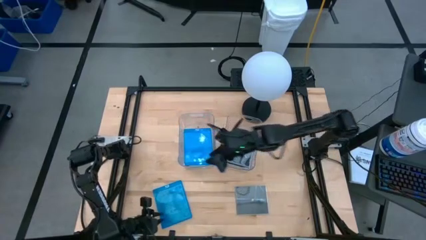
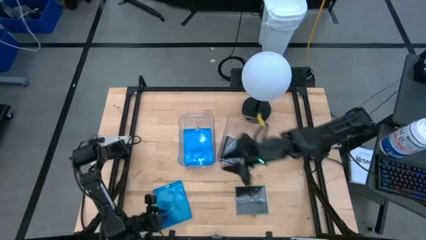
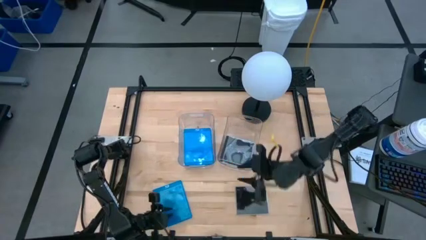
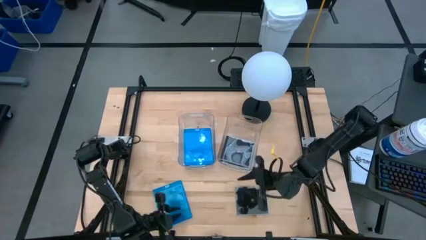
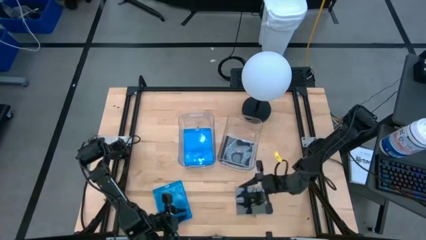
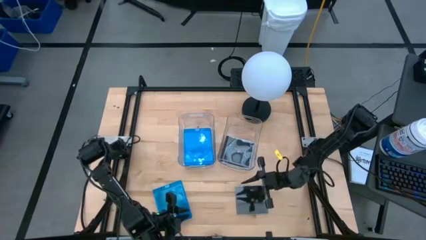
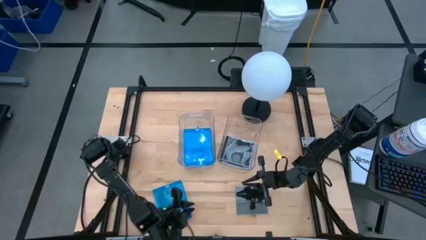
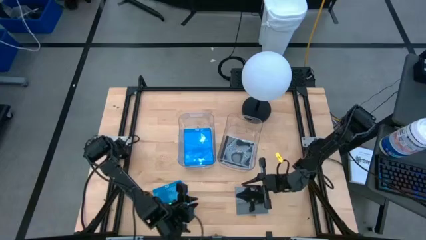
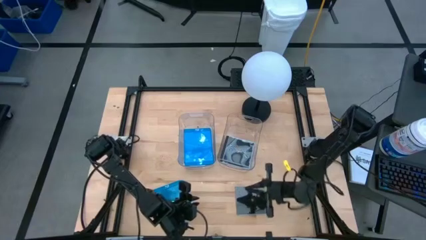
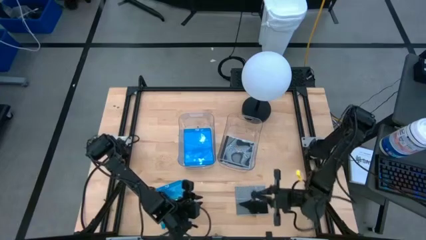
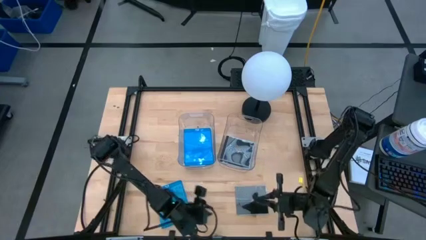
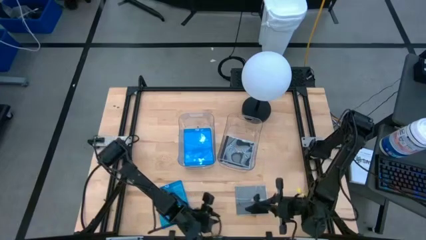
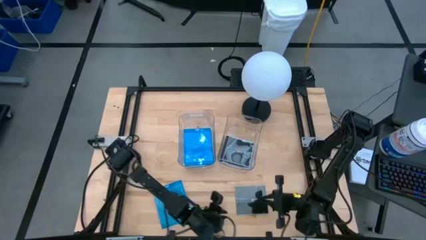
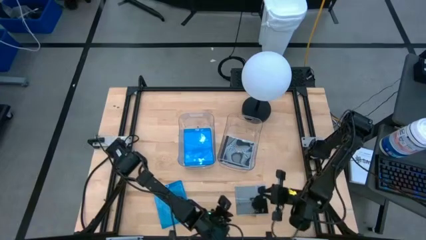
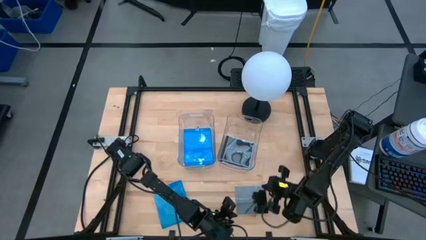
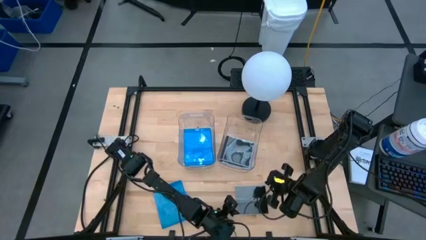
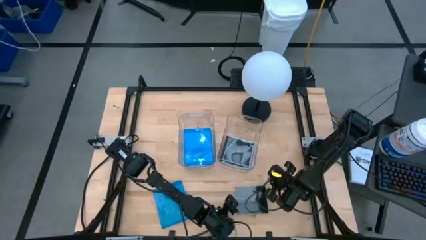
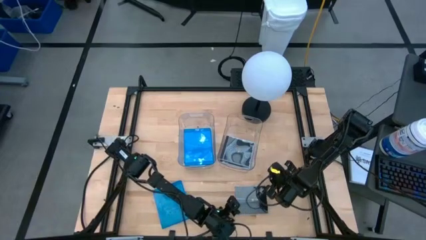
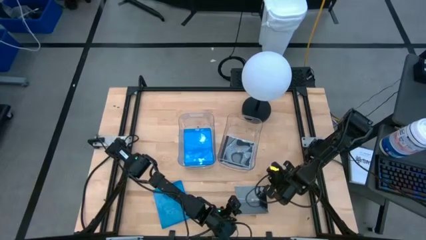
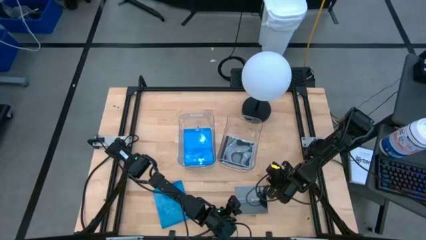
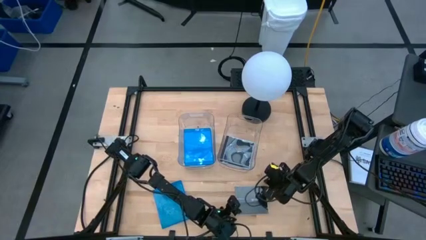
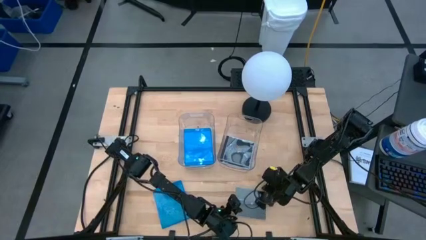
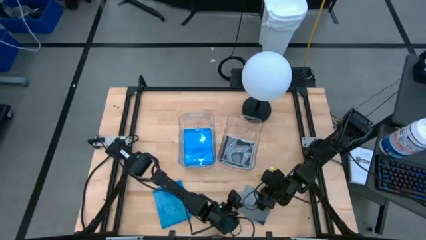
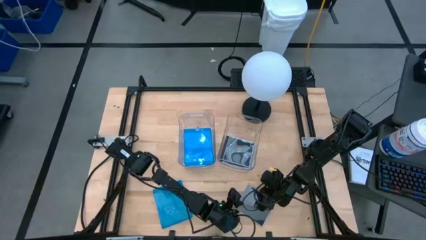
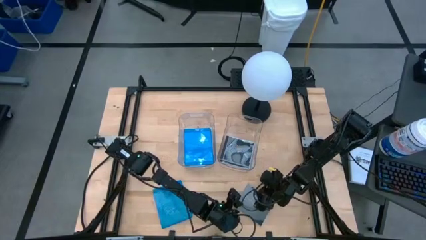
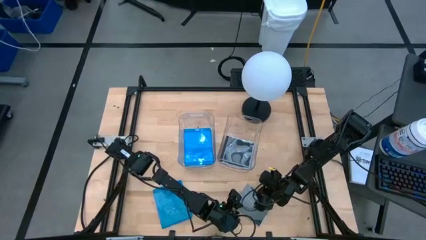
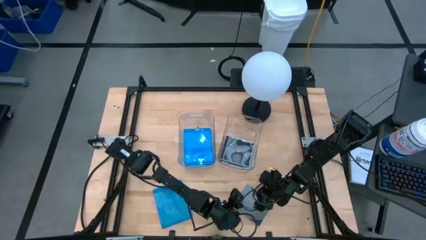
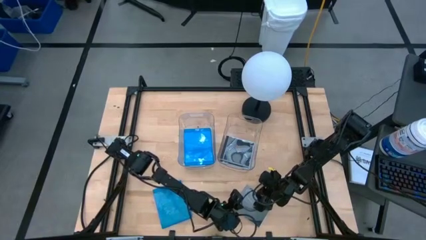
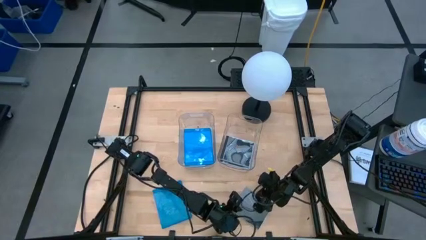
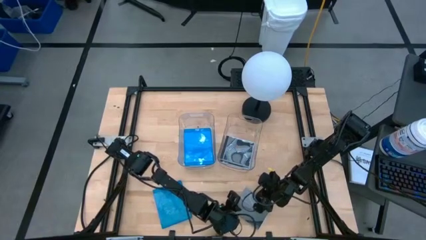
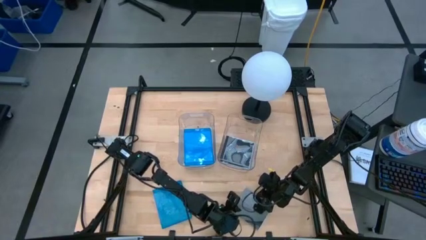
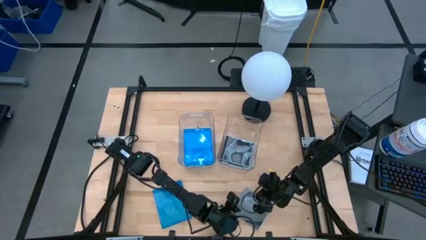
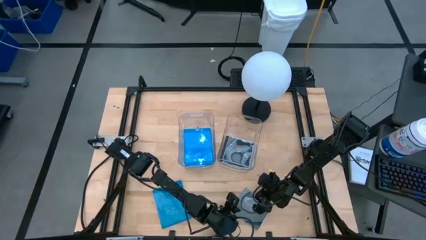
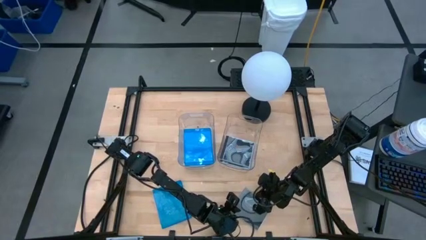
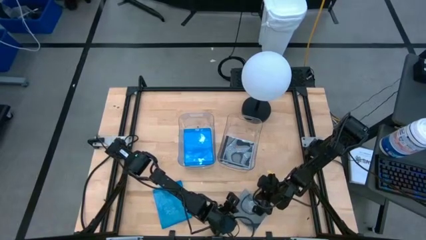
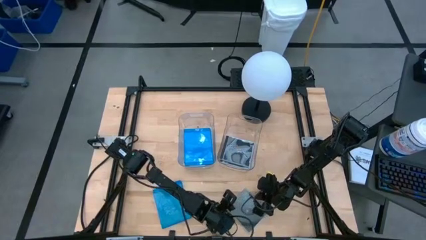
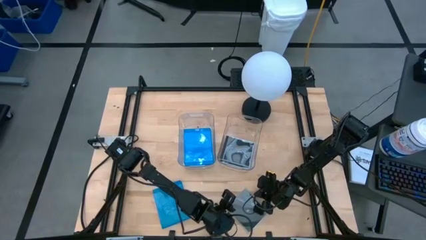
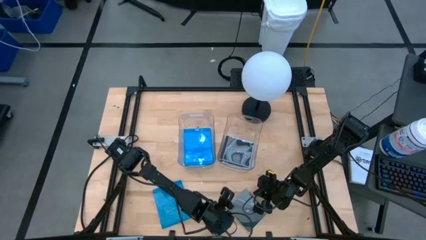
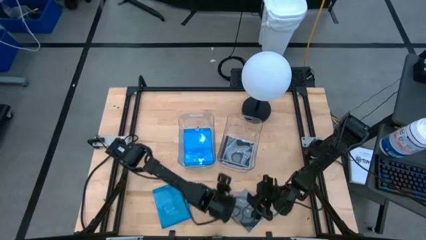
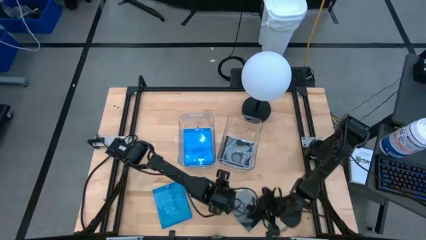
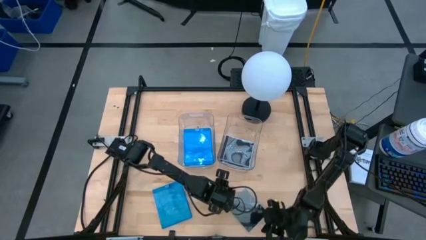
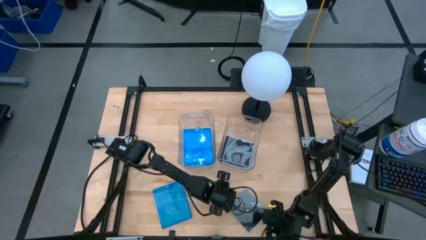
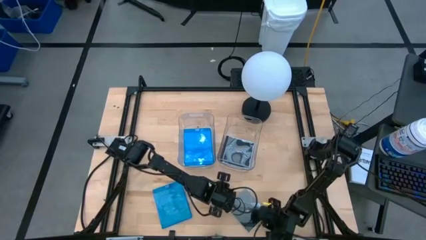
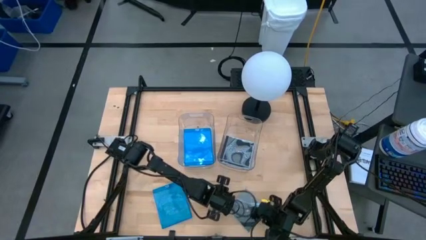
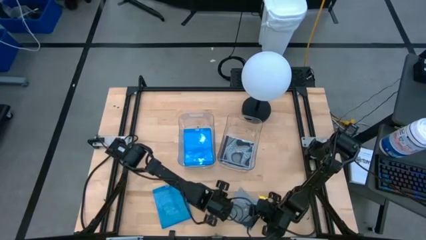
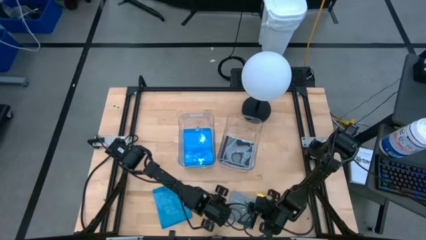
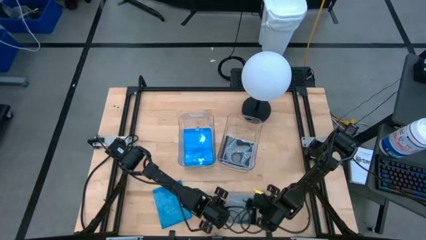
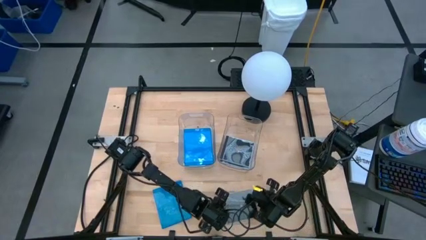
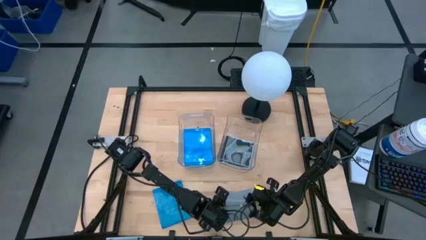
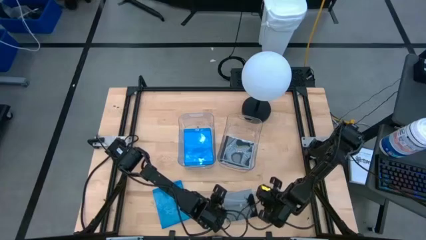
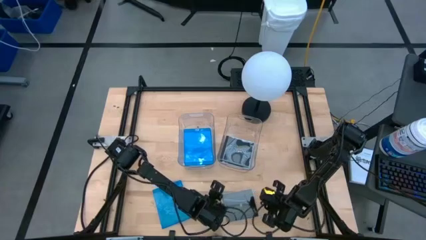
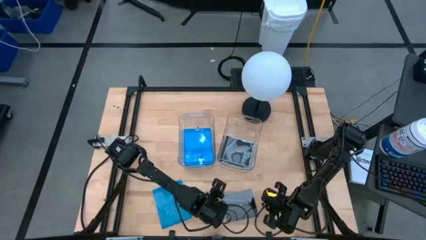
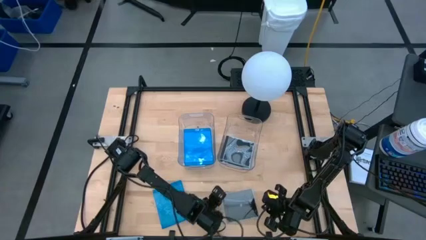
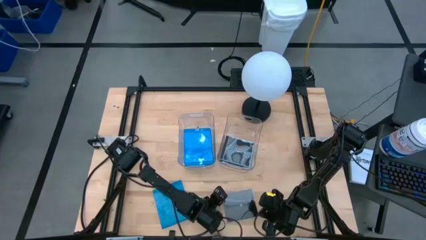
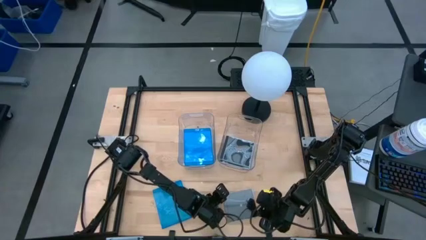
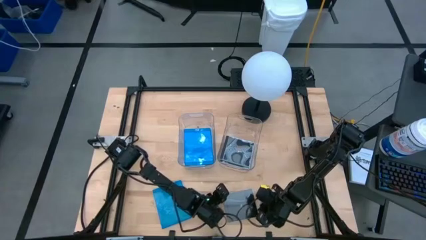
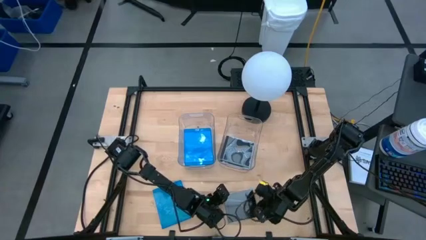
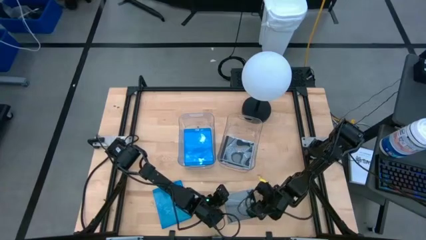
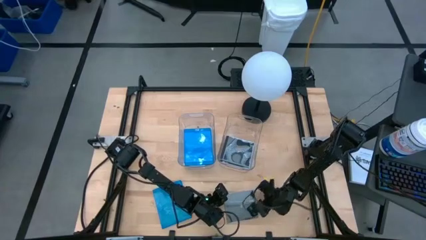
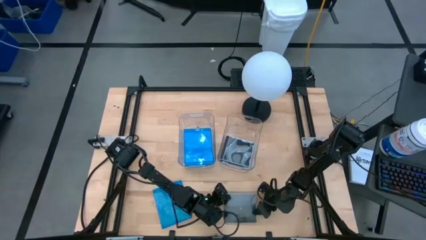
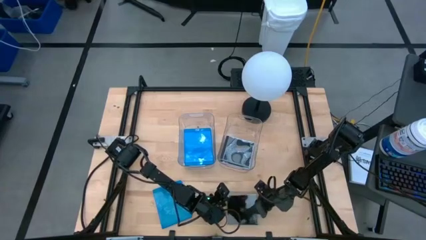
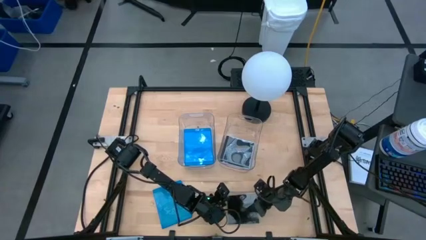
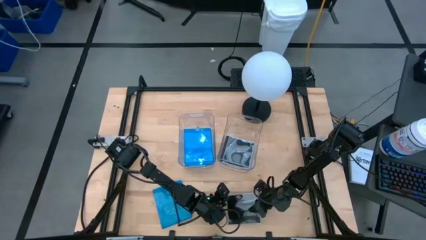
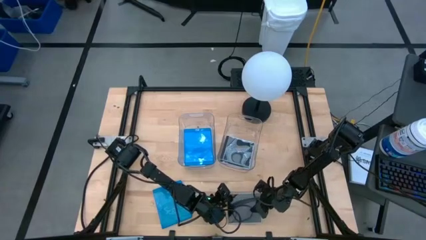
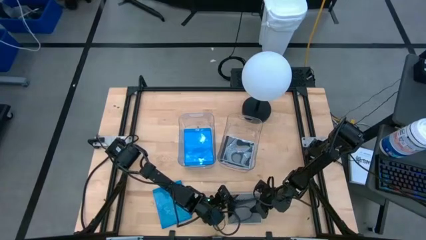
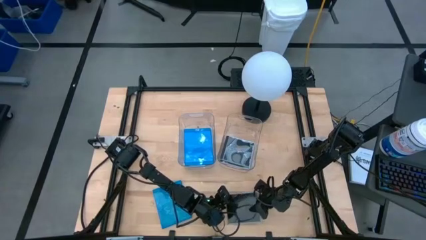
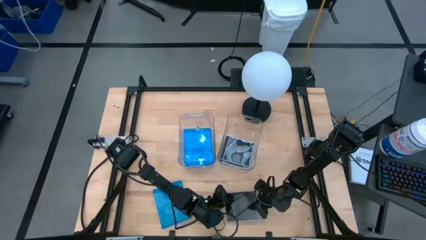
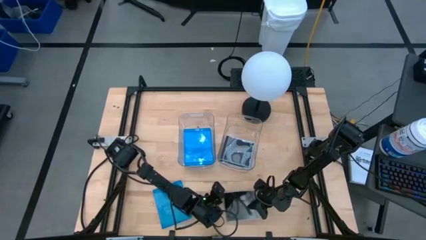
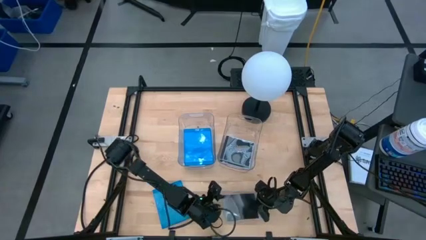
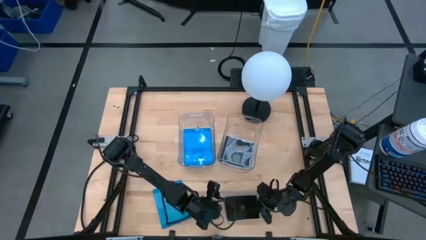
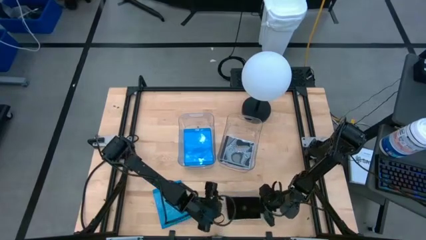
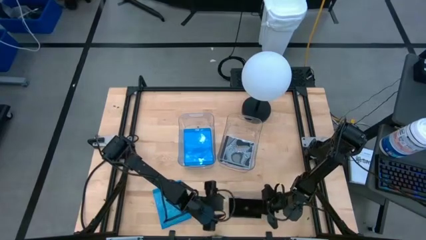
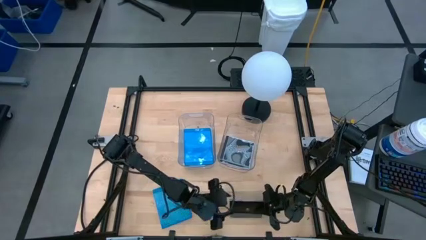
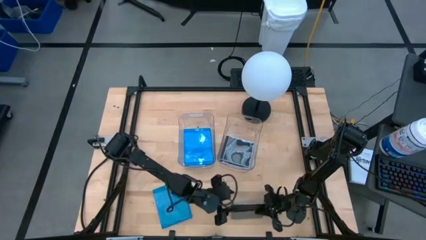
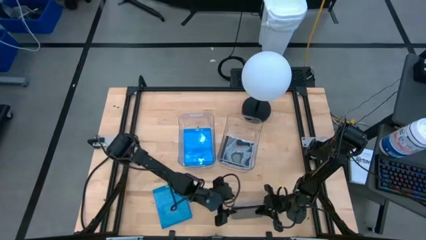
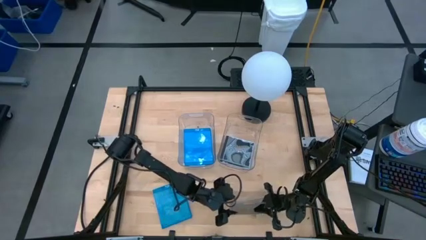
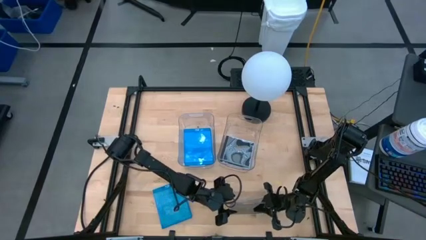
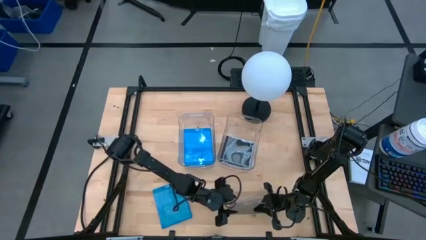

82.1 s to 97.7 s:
Task: Pick & place jewel cases by type
Put the black cd case into the right transparent bin
